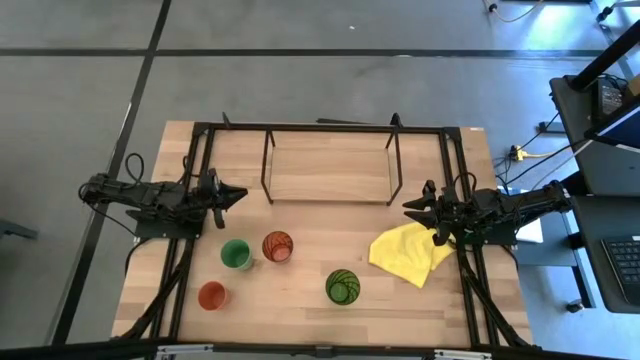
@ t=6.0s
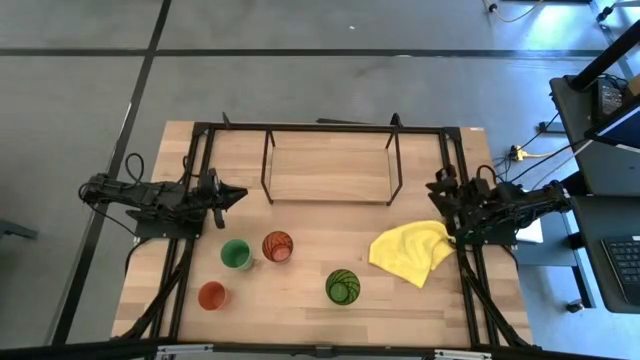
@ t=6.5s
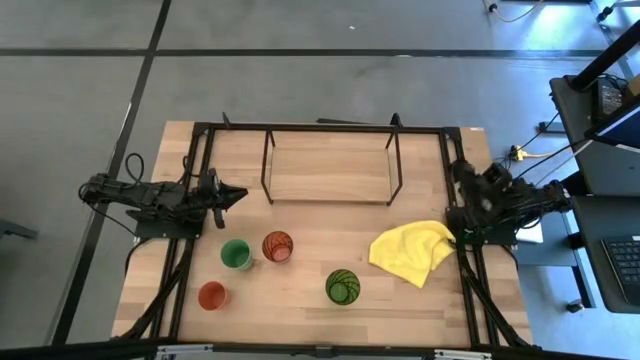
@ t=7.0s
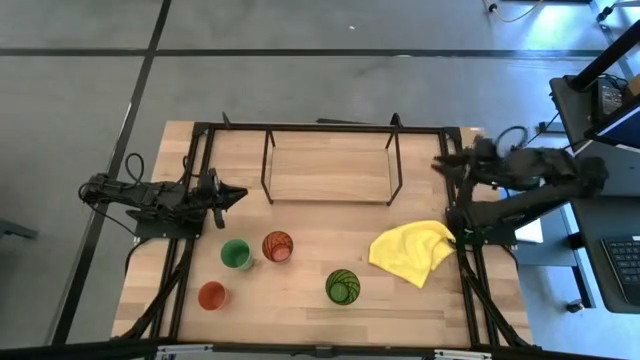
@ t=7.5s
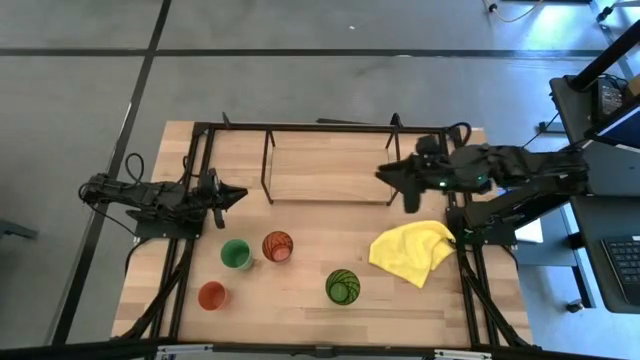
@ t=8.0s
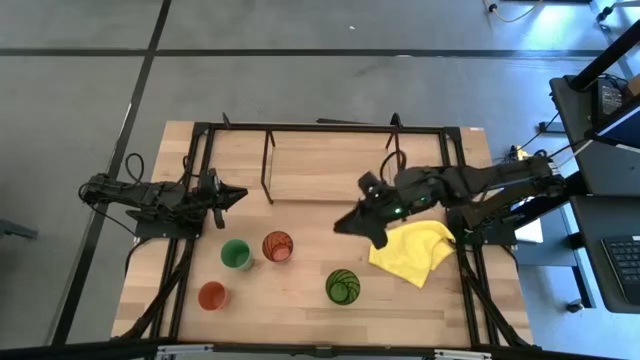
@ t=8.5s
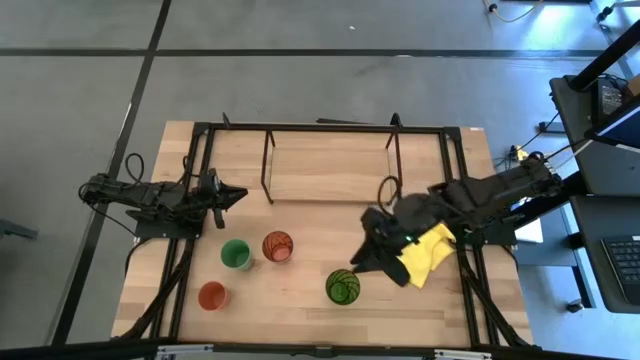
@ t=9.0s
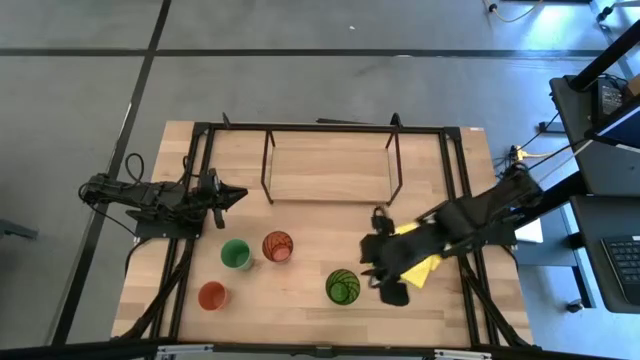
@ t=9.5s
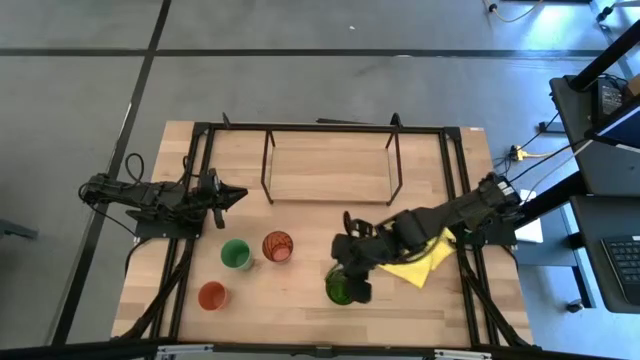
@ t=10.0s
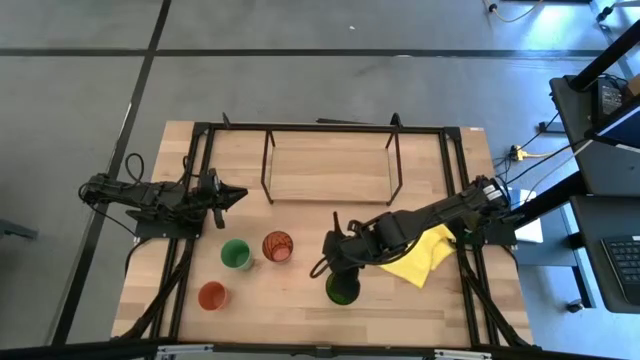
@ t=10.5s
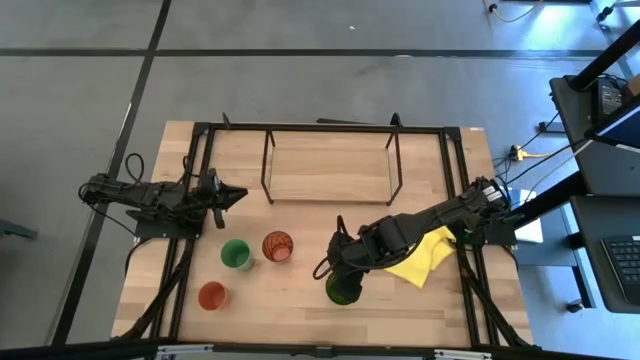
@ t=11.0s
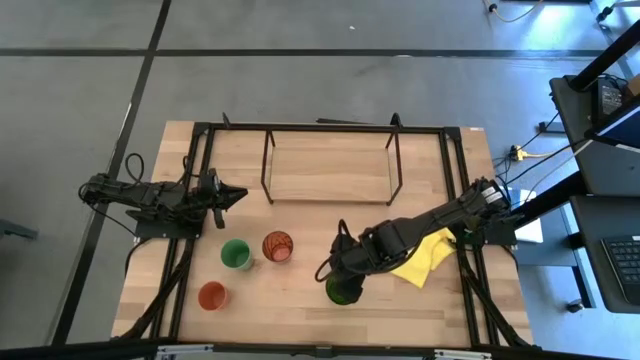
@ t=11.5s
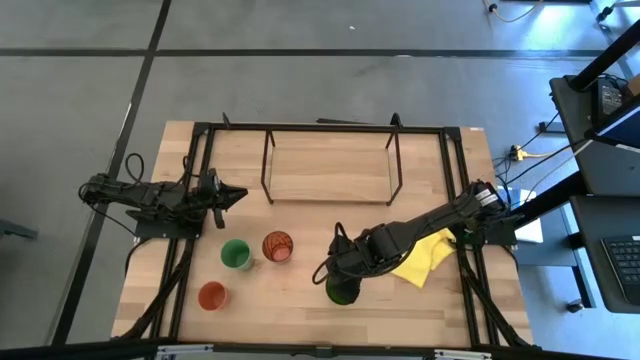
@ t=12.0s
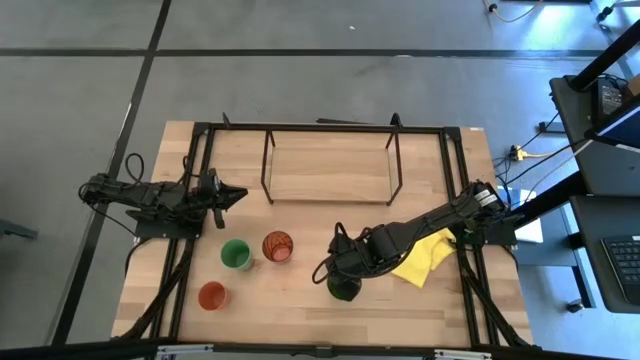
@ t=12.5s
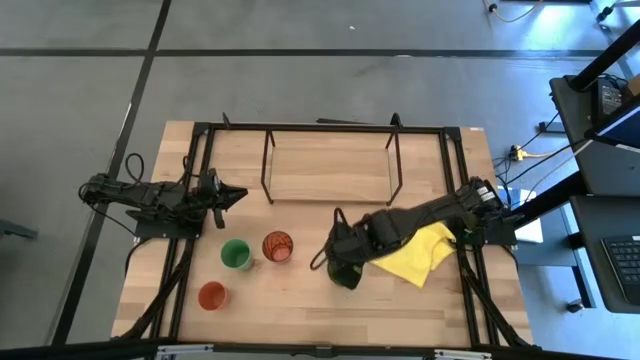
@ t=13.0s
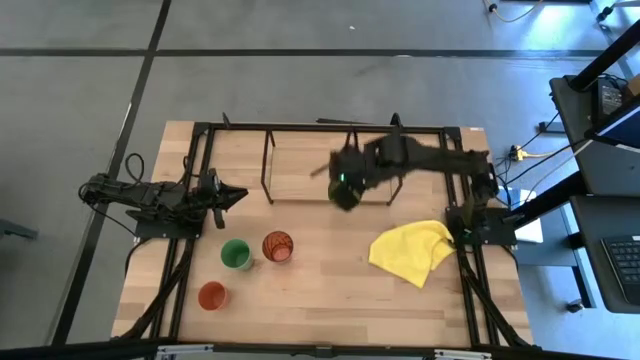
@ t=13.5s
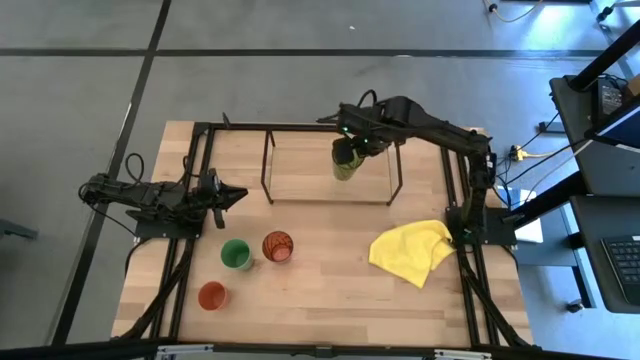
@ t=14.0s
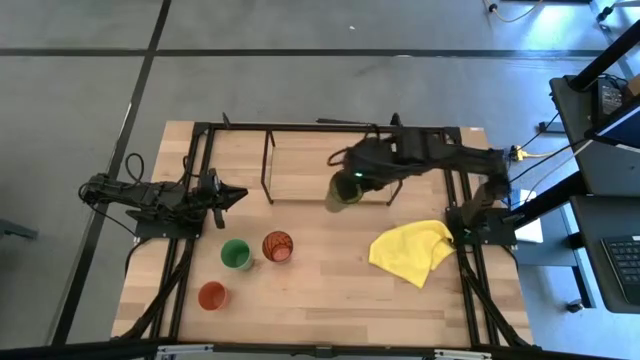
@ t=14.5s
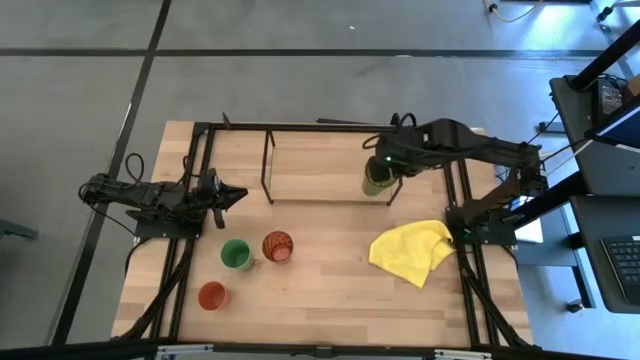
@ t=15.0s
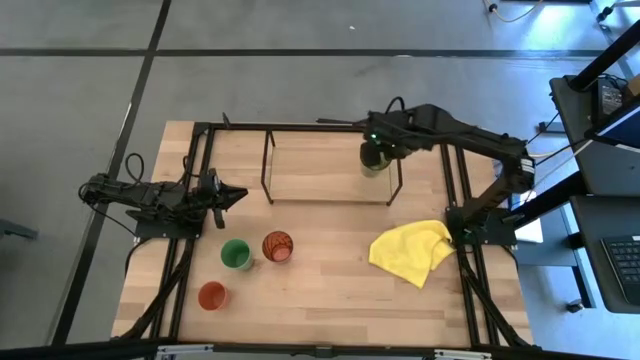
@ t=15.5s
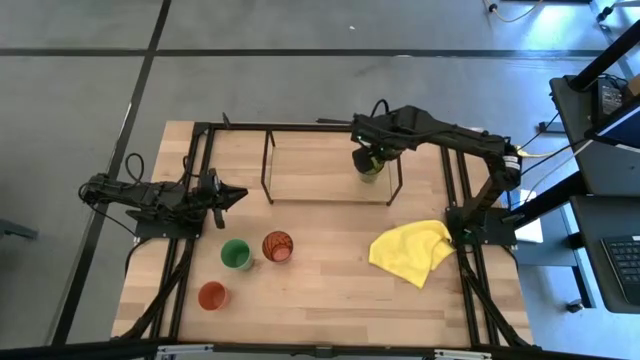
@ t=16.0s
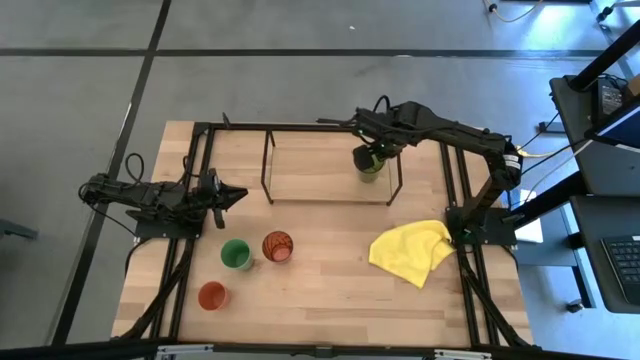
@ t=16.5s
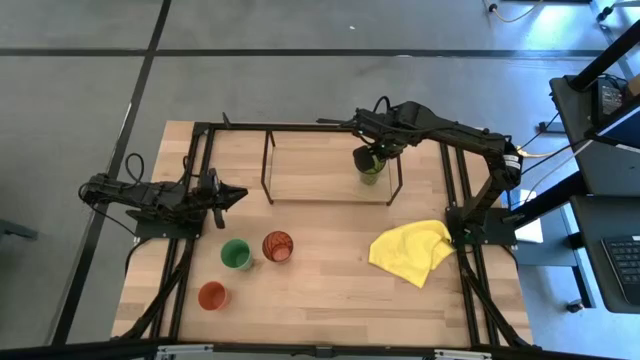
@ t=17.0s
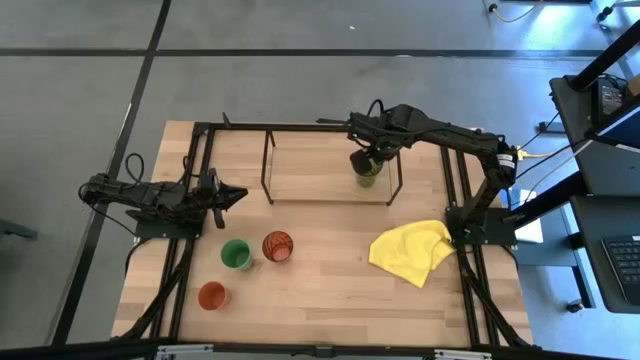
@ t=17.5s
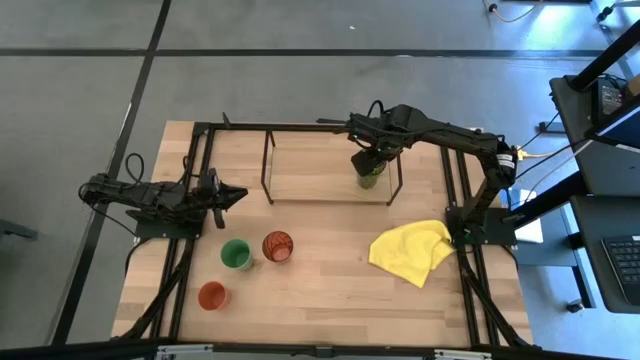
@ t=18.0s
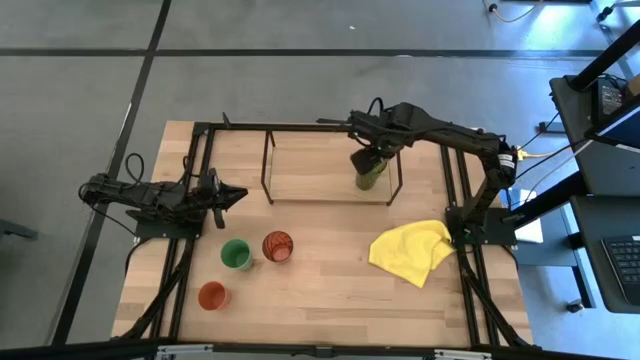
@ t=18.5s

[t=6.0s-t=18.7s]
Task: Stack small to large cups/mugs on shelf
Put the light green cup on the shelf
